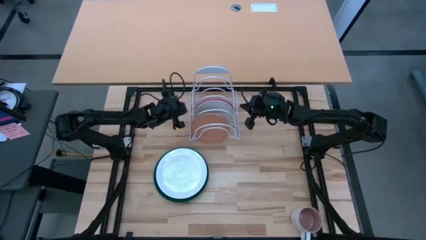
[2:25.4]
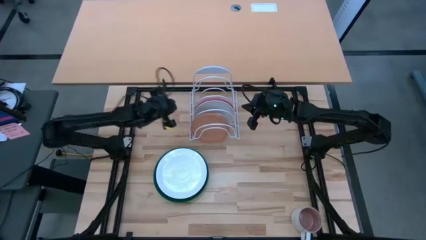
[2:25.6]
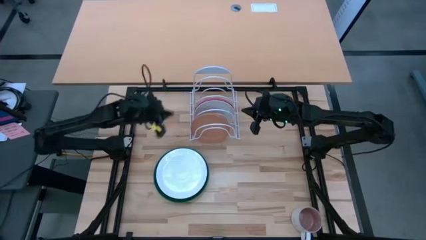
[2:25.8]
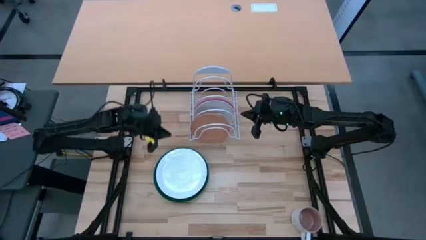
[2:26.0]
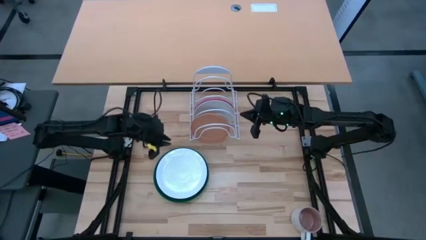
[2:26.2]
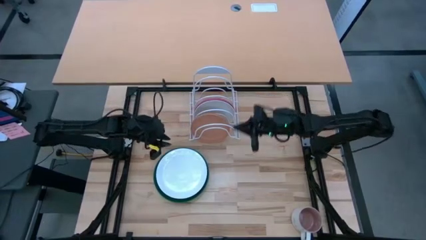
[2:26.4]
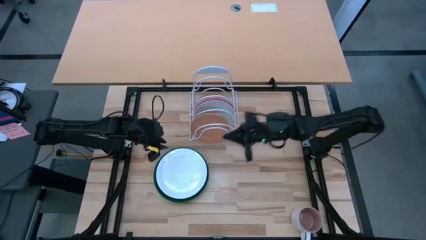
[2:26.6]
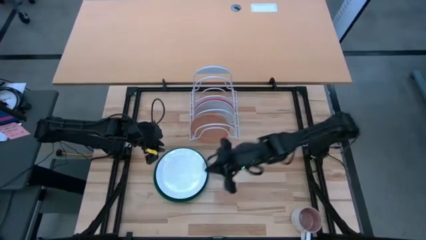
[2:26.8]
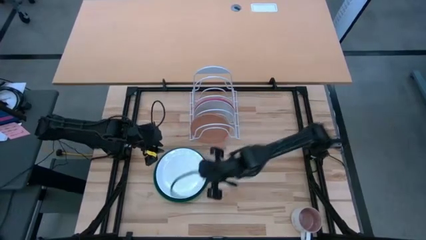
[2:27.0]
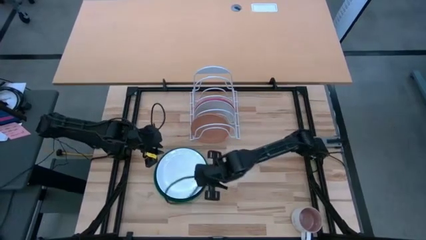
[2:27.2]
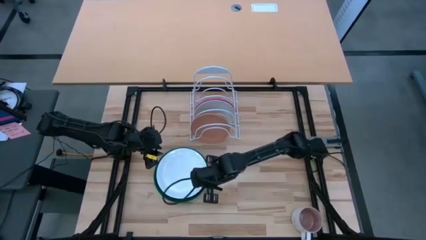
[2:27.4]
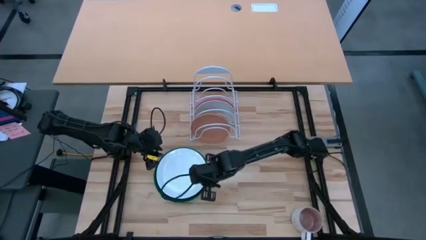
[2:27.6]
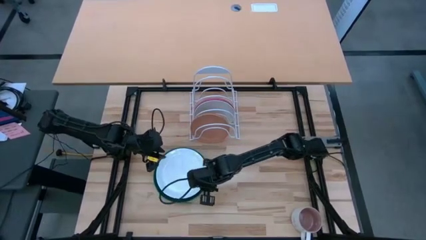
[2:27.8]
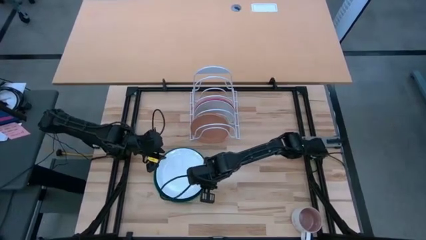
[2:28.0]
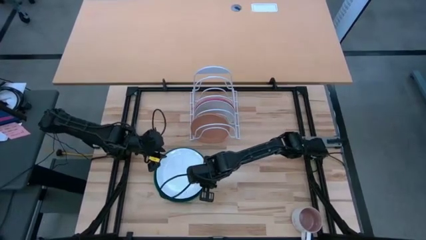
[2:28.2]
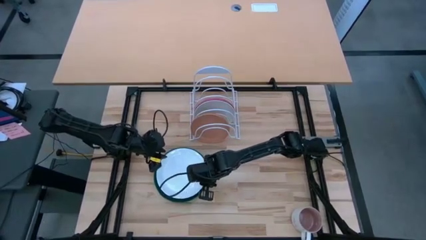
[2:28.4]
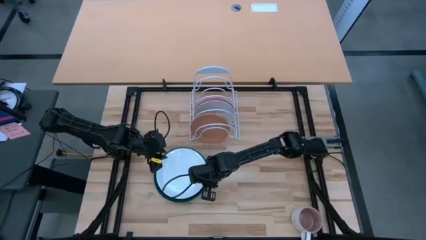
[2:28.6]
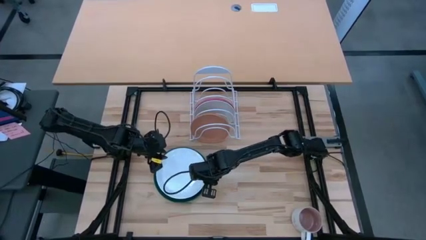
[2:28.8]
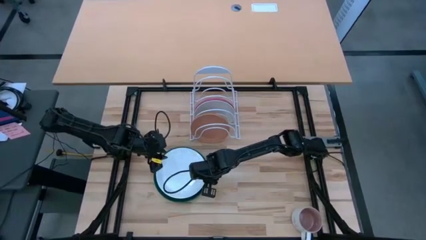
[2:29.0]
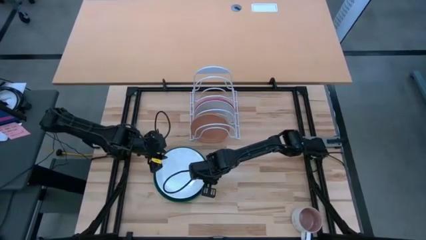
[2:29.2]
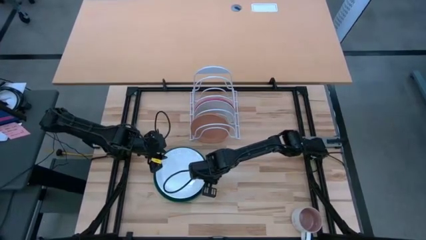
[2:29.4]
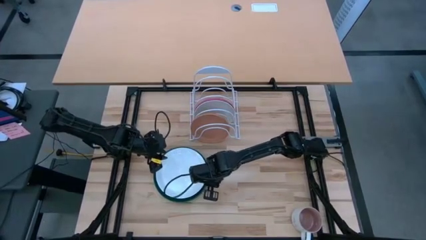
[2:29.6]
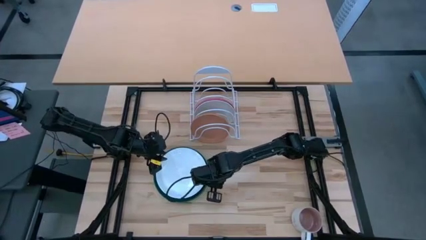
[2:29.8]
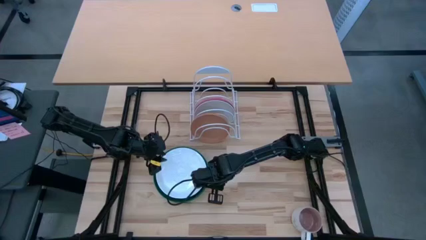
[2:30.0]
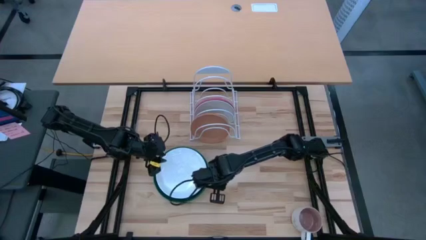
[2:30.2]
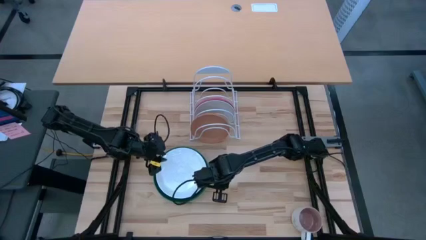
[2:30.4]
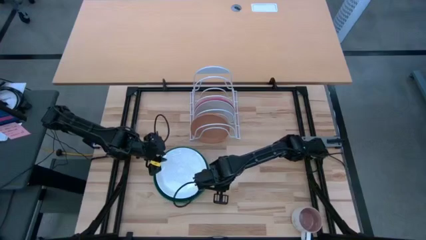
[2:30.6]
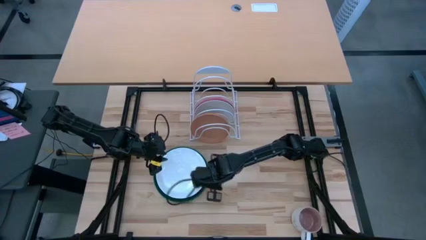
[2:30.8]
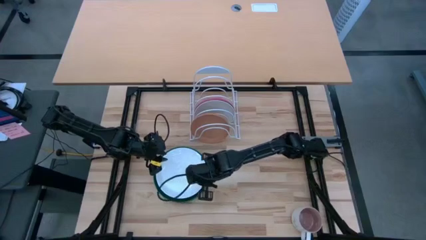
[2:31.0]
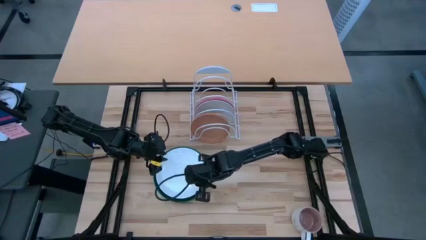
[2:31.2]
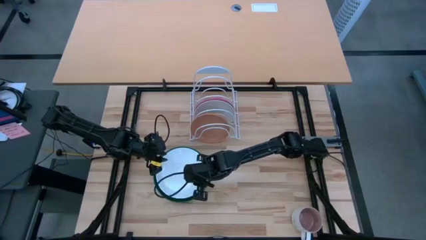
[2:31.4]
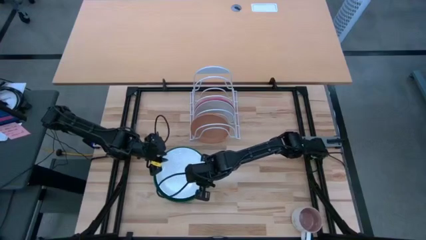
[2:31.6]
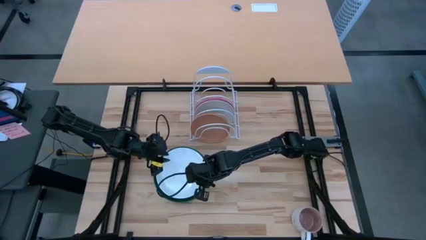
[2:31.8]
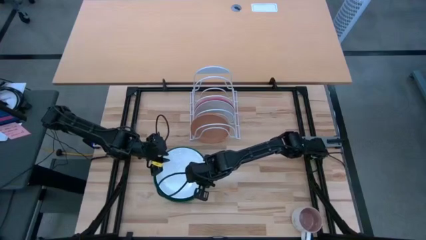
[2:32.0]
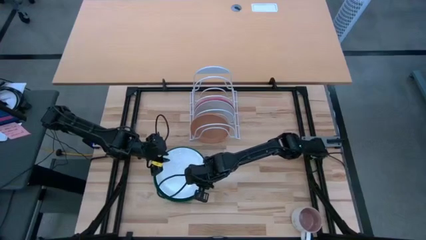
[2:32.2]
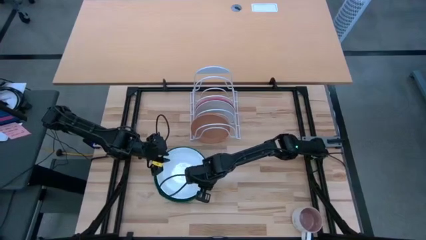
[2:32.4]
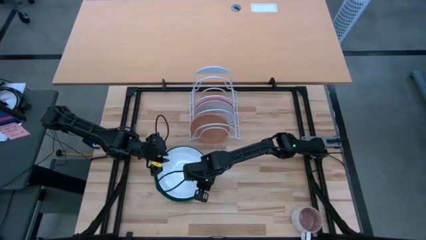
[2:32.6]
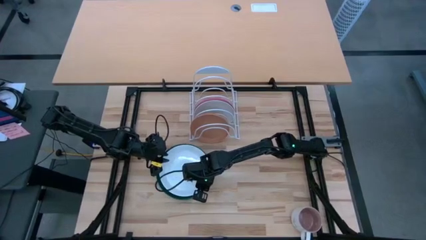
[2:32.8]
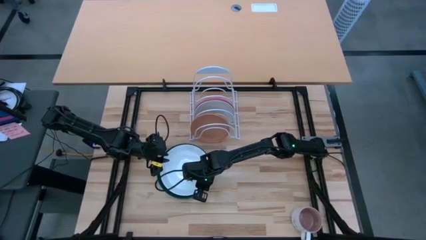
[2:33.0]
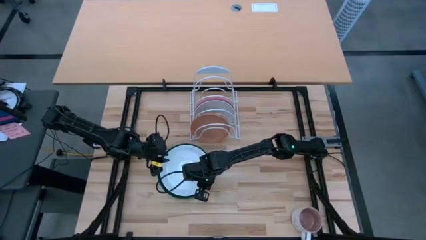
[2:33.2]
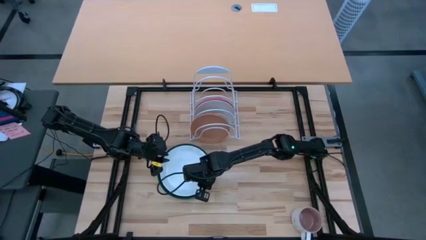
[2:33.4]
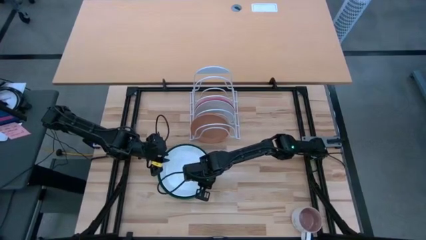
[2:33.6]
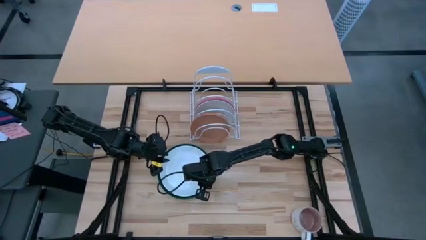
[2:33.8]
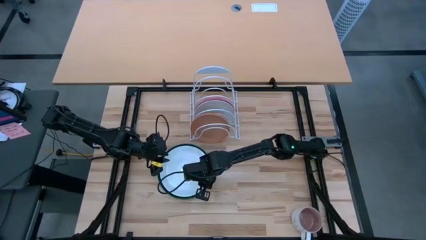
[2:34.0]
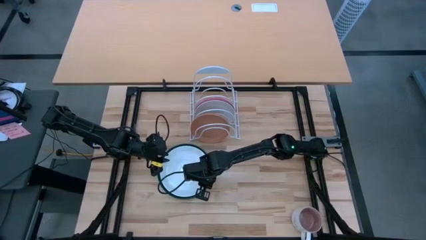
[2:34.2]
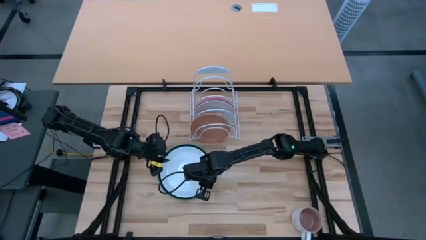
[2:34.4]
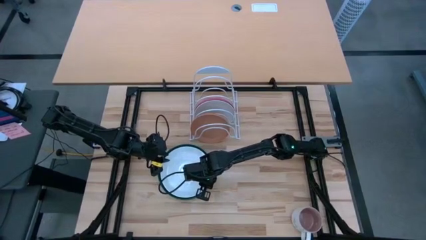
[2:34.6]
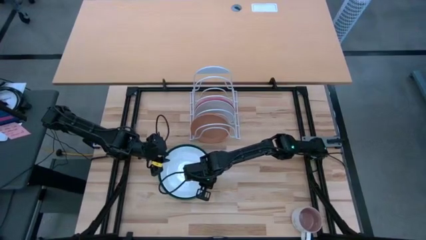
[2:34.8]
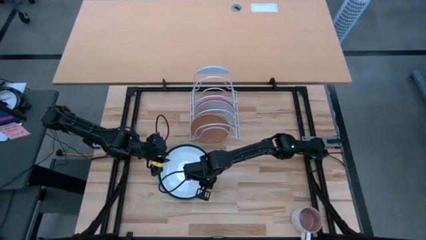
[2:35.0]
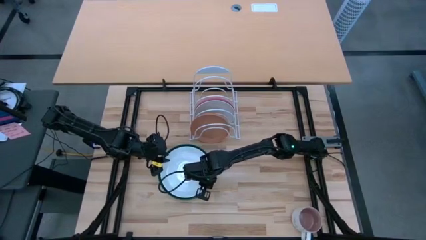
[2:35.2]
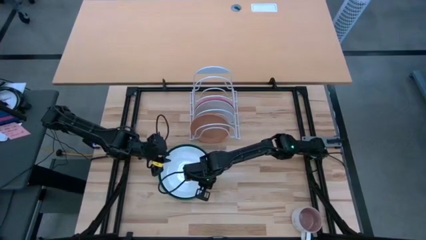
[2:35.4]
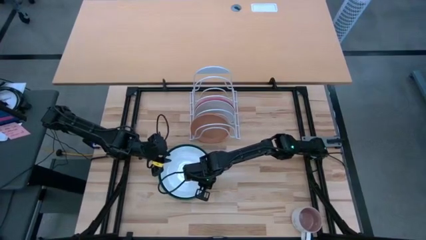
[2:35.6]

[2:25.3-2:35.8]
Task: Sort dishes
Put the white plate on the dish rack

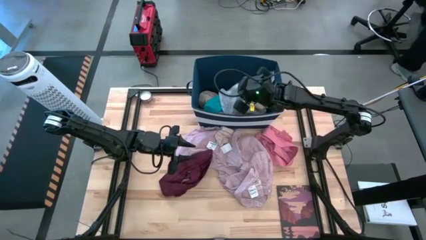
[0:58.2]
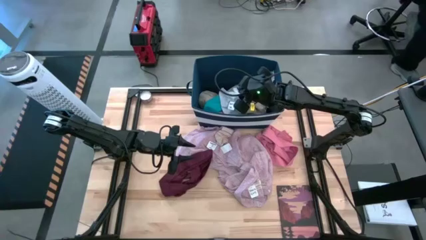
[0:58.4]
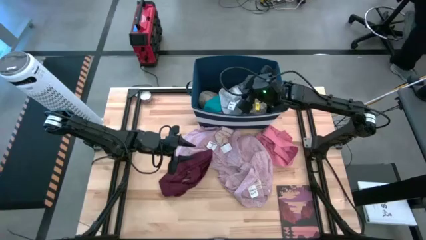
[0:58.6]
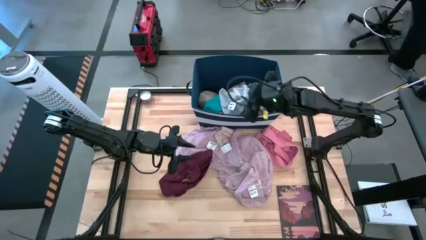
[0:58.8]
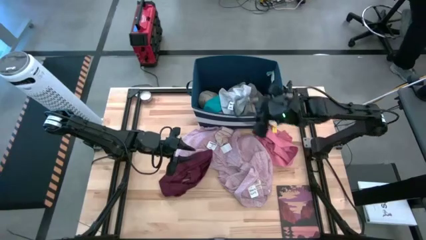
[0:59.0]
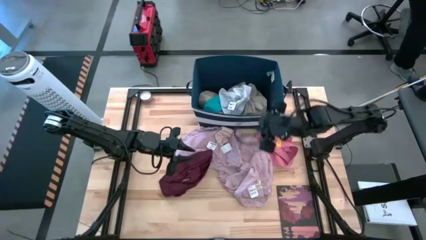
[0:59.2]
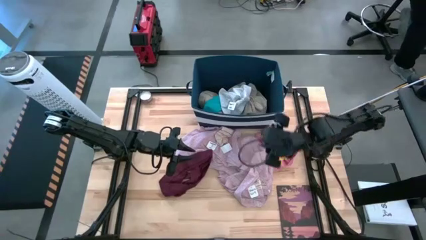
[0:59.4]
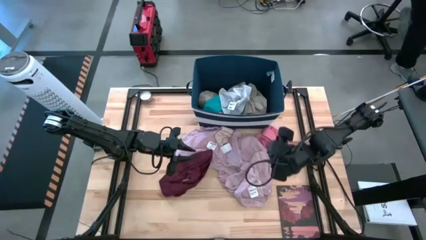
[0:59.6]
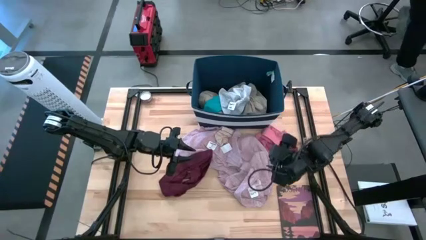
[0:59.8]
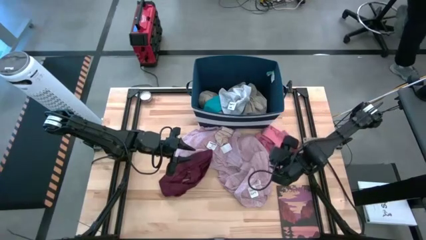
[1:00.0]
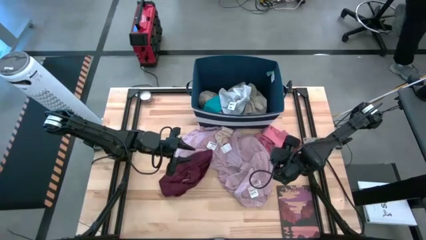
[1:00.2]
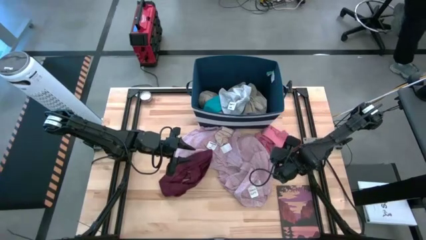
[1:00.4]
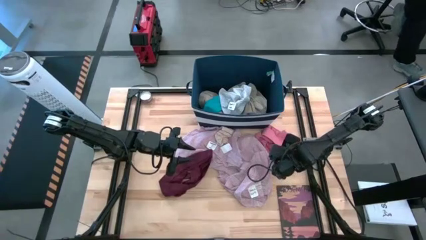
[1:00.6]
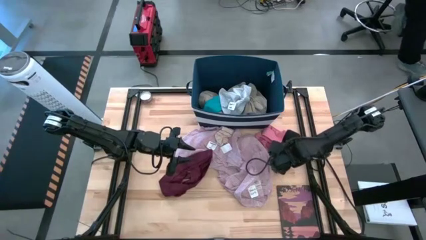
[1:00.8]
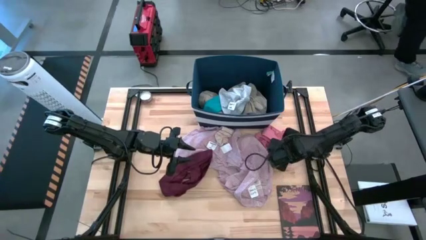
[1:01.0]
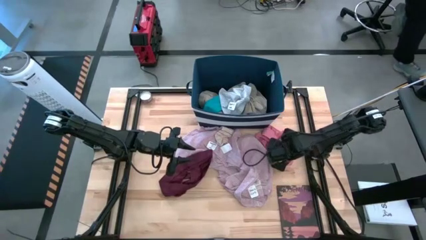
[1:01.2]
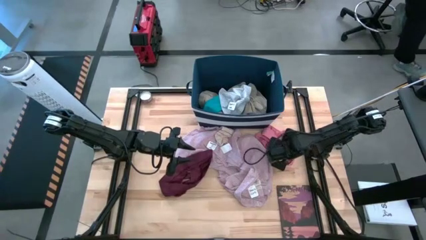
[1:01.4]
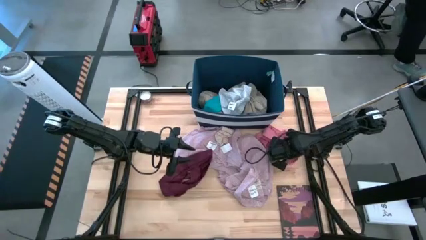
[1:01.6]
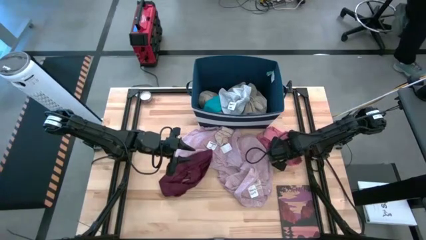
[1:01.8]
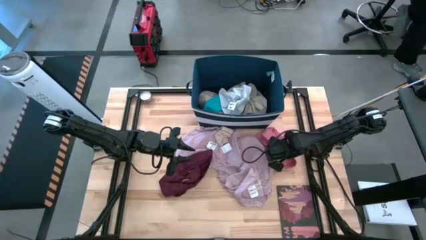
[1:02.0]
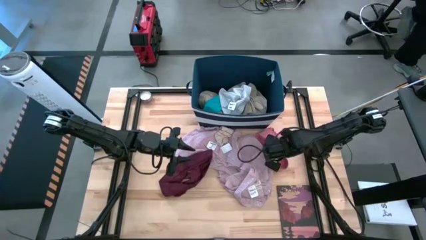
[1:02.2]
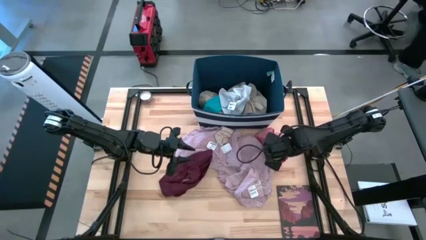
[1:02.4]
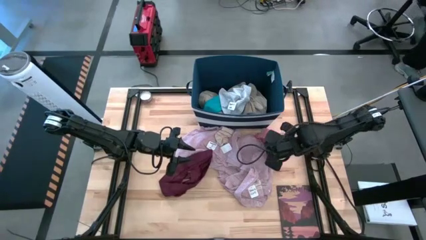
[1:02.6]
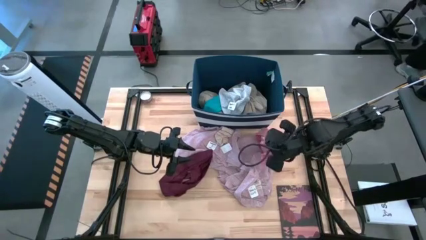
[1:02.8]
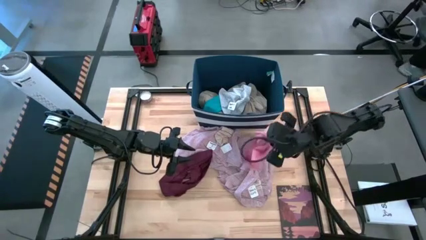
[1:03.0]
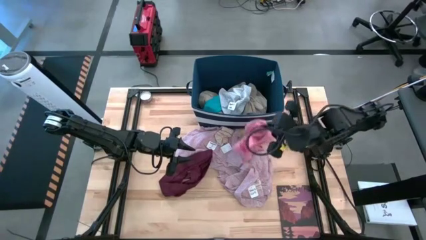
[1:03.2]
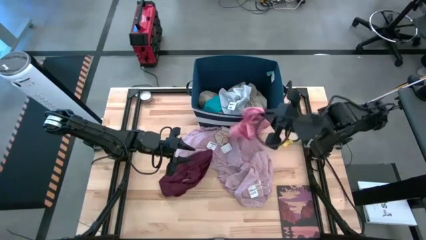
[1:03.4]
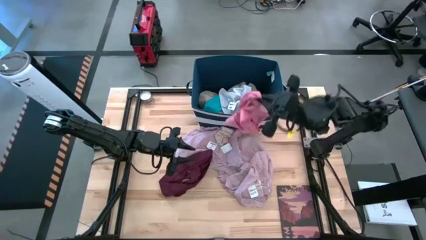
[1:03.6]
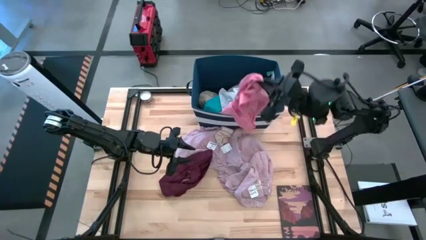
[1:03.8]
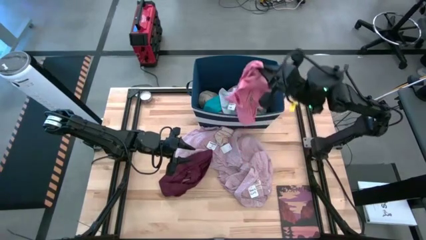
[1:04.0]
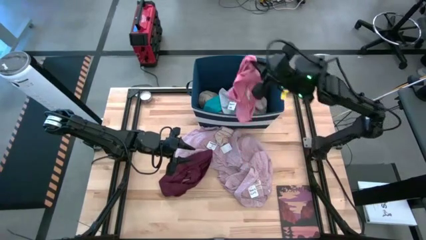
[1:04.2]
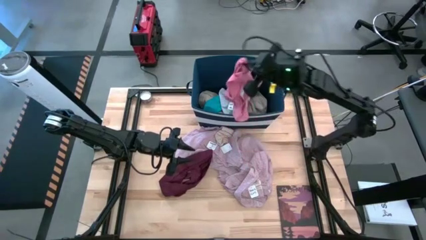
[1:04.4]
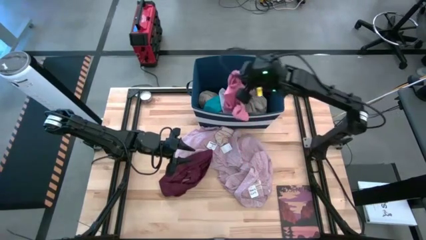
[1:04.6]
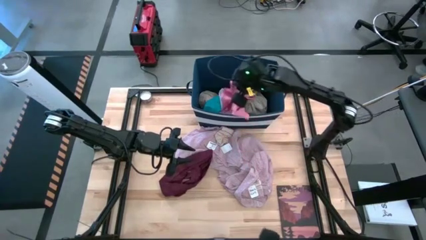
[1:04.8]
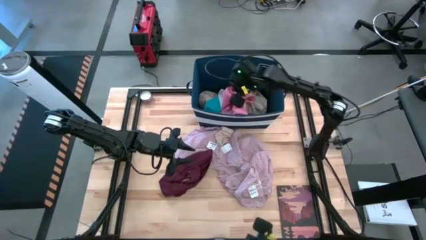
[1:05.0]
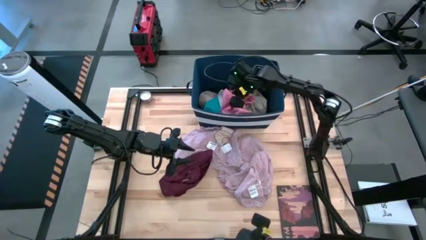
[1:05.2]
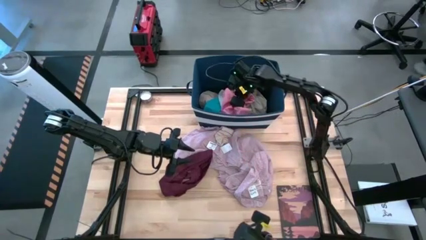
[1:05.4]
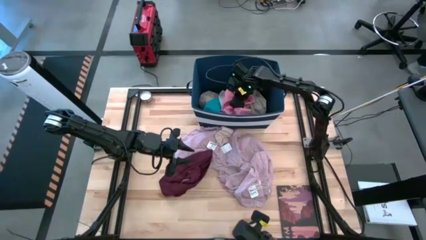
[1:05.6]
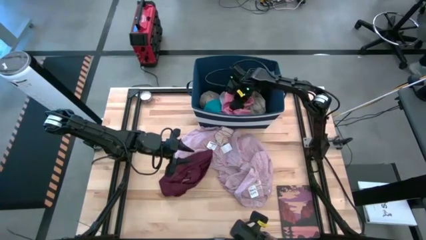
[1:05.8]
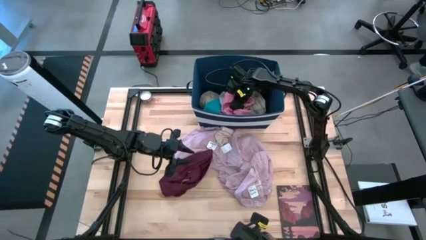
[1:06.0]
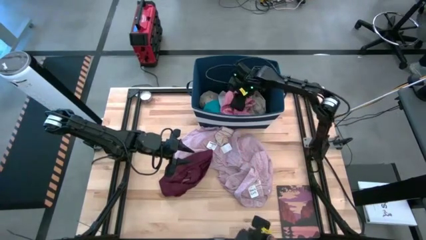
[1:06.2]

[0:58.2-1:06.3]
Task: Sort clothes
Put the pink underwear into the blue laundry organizer
